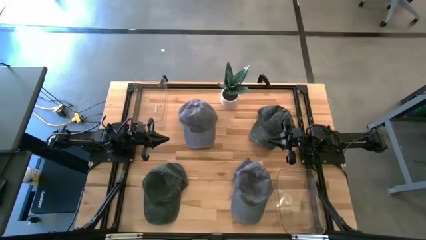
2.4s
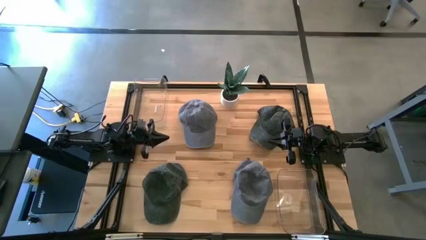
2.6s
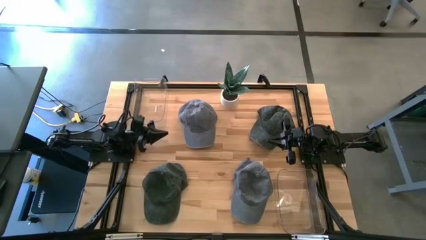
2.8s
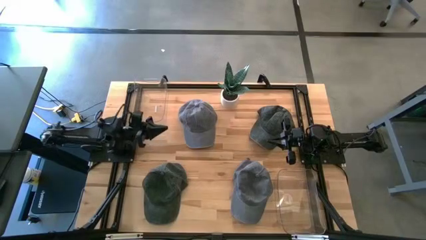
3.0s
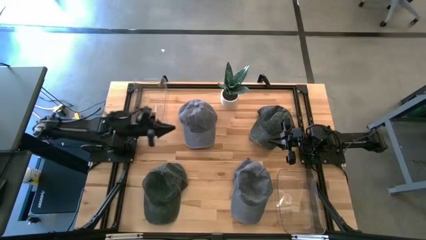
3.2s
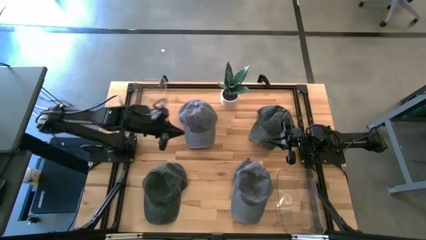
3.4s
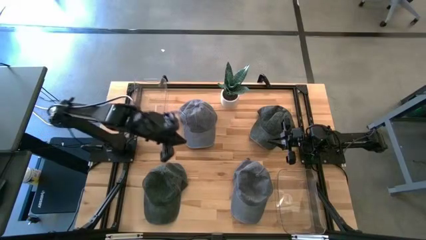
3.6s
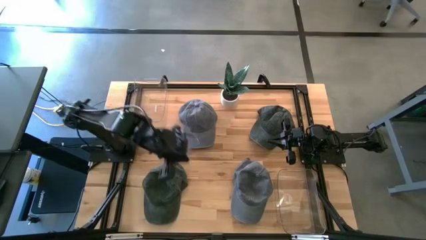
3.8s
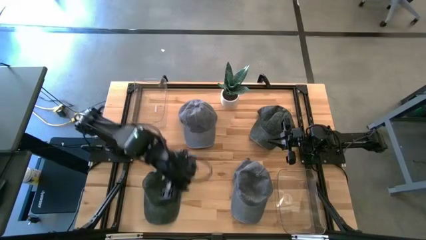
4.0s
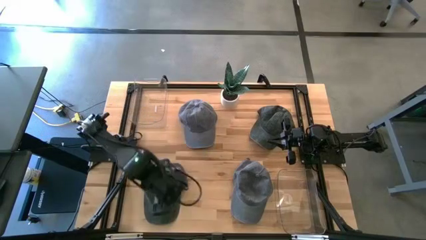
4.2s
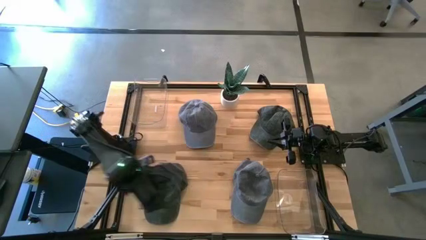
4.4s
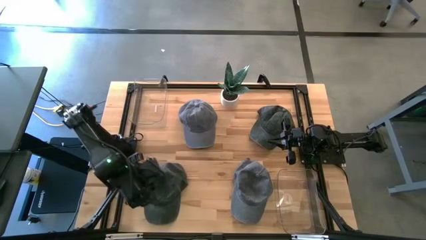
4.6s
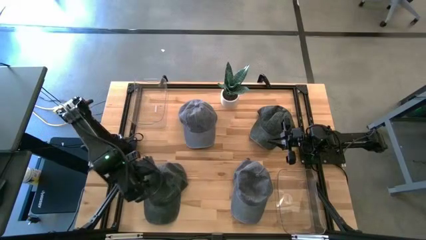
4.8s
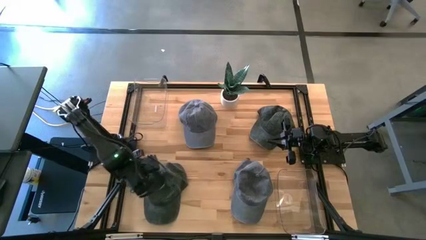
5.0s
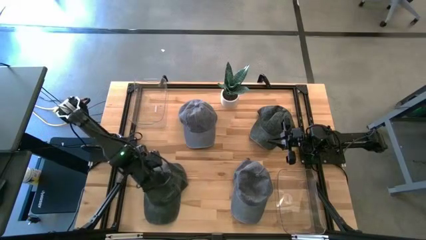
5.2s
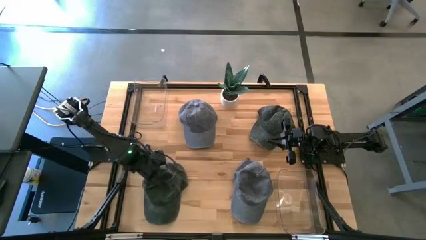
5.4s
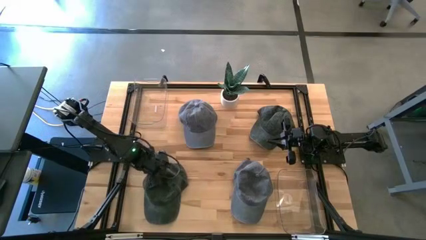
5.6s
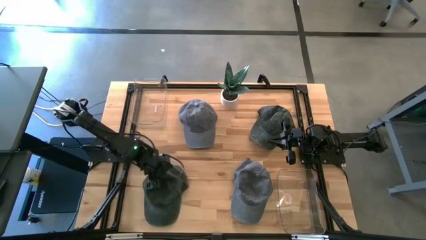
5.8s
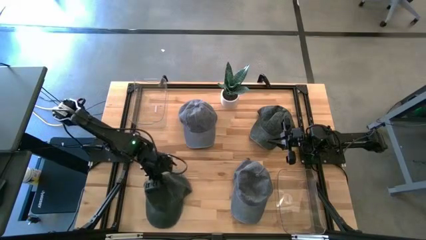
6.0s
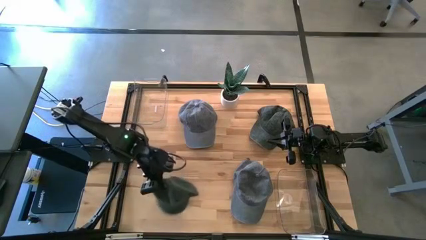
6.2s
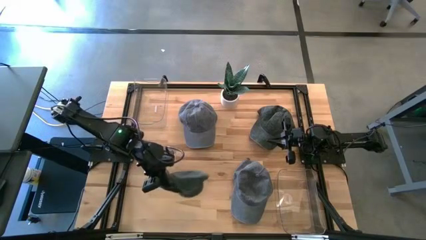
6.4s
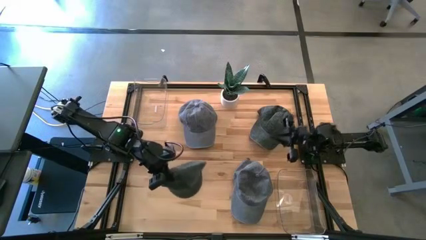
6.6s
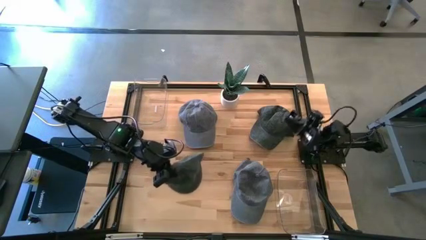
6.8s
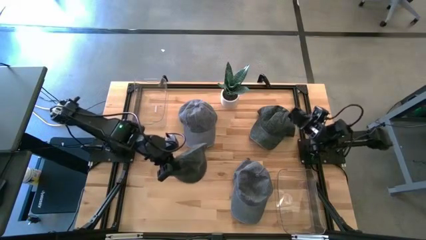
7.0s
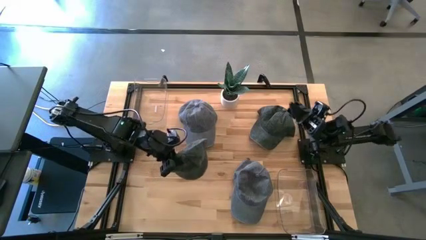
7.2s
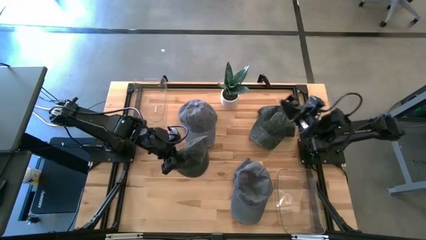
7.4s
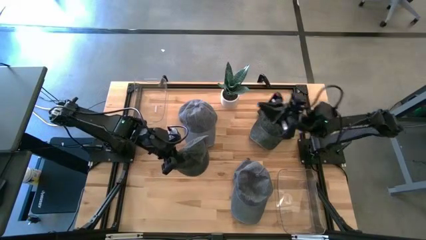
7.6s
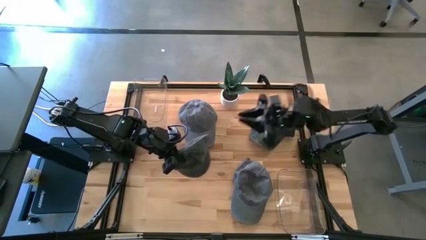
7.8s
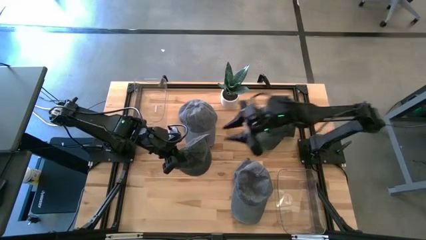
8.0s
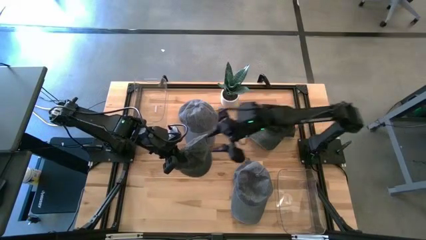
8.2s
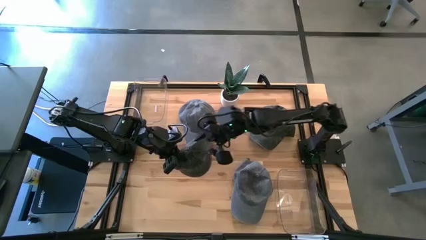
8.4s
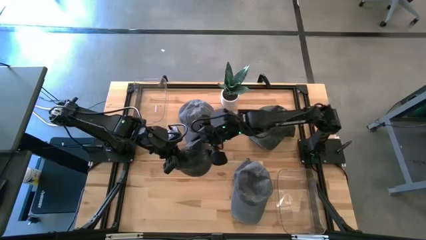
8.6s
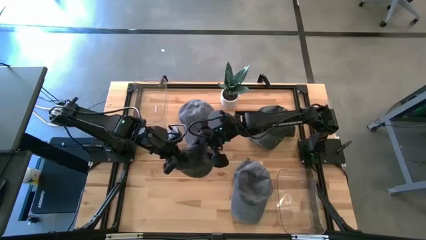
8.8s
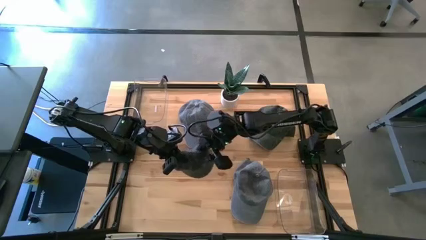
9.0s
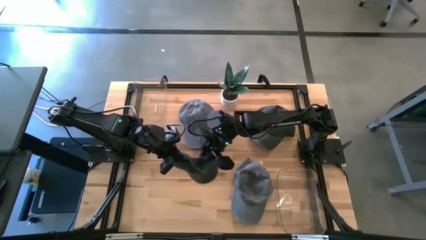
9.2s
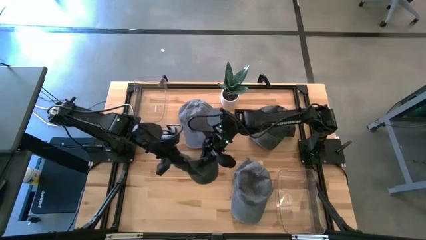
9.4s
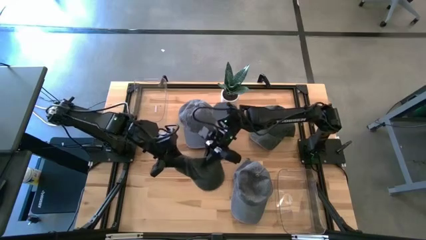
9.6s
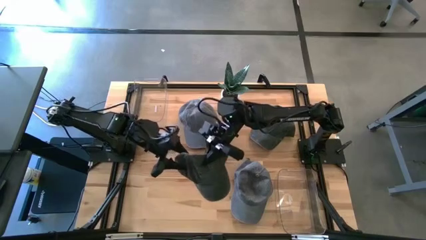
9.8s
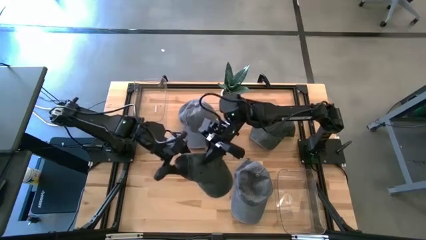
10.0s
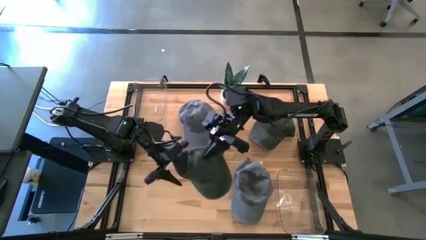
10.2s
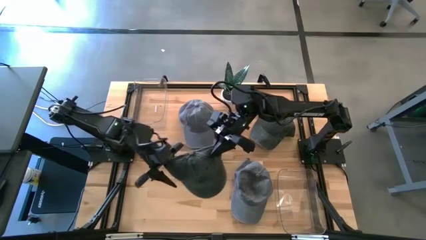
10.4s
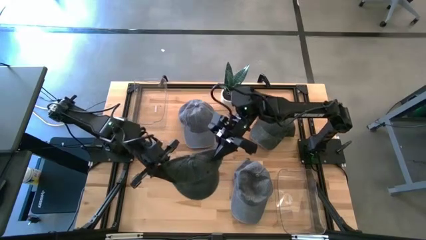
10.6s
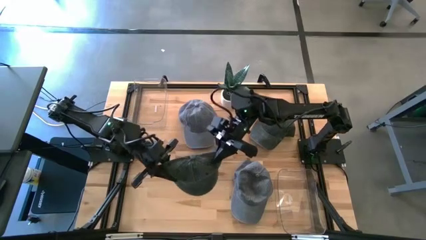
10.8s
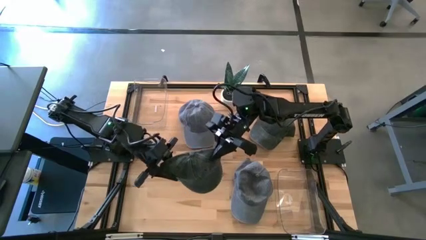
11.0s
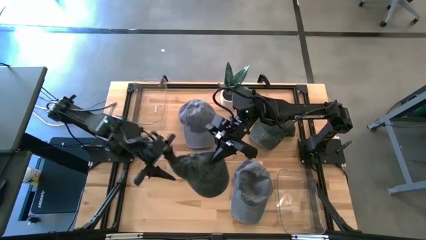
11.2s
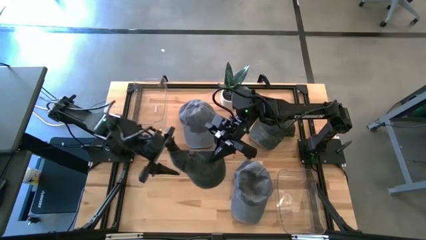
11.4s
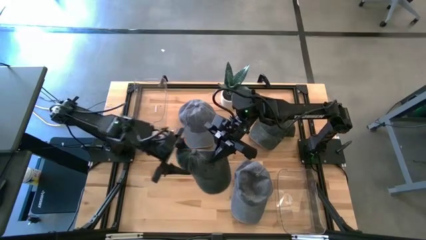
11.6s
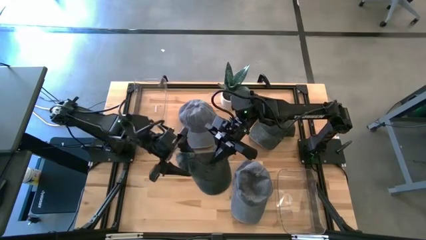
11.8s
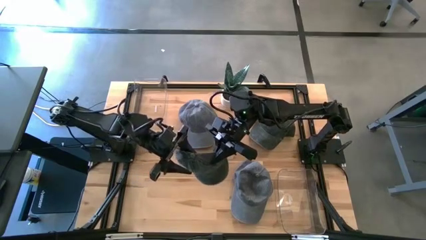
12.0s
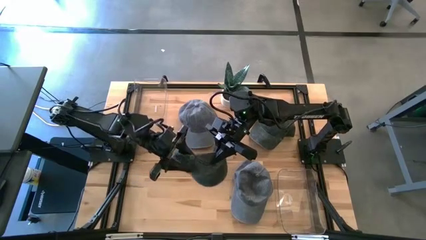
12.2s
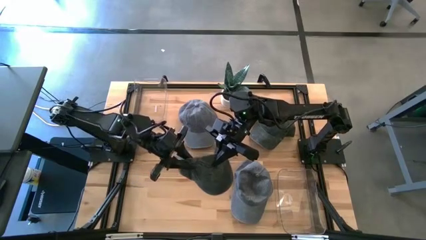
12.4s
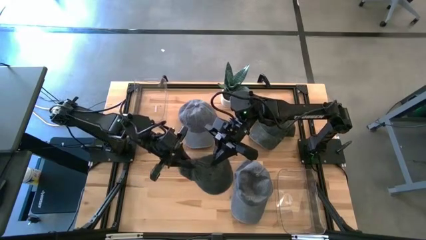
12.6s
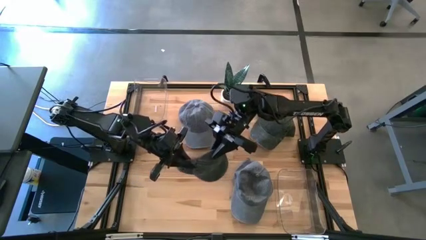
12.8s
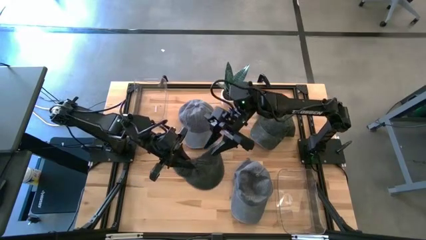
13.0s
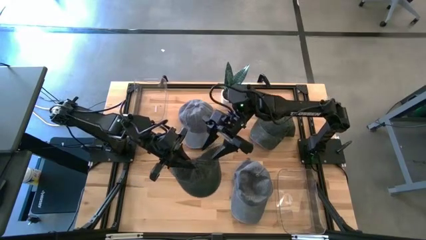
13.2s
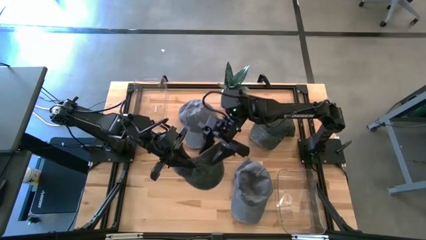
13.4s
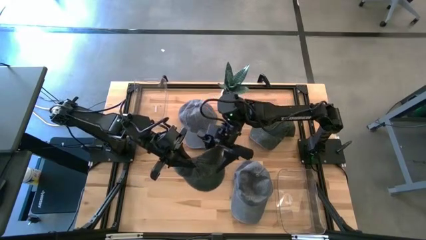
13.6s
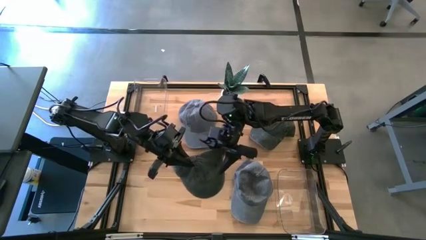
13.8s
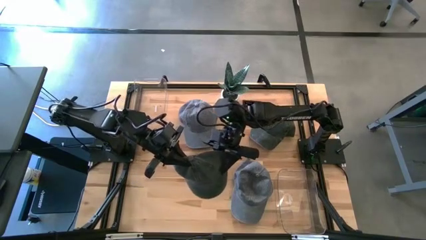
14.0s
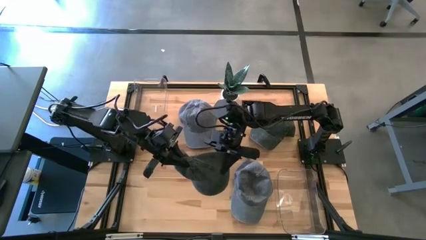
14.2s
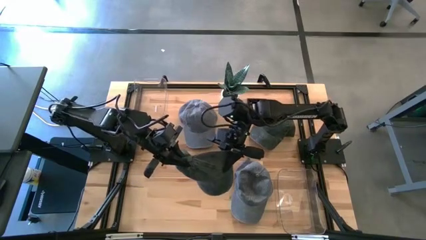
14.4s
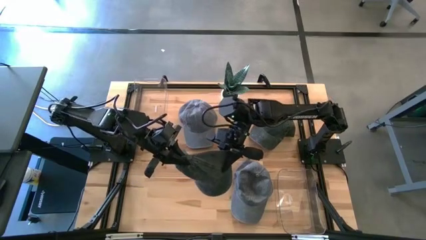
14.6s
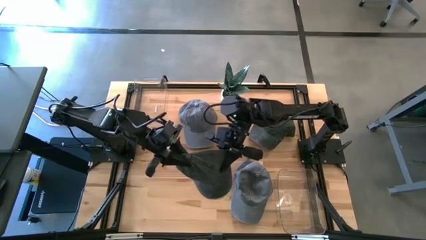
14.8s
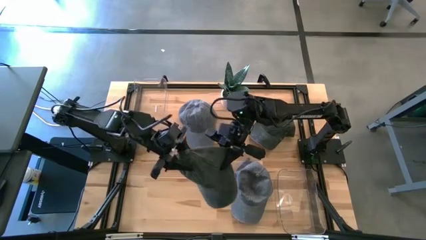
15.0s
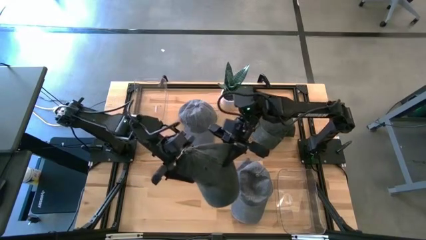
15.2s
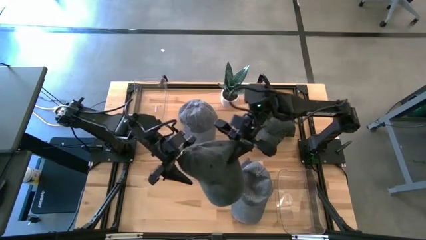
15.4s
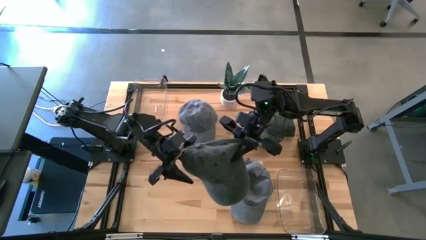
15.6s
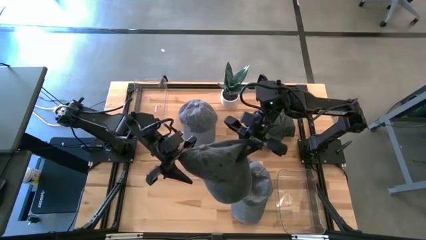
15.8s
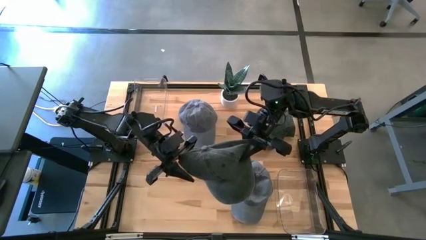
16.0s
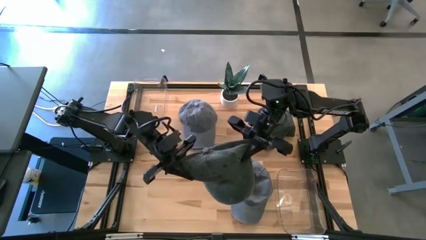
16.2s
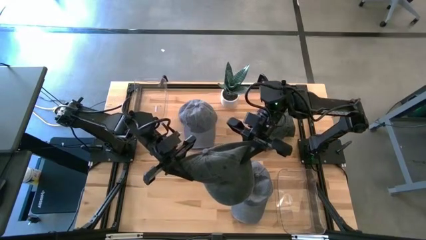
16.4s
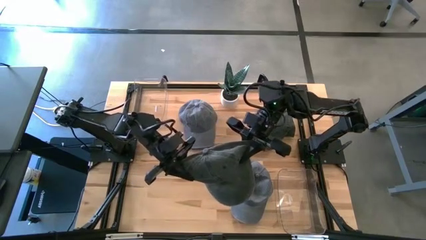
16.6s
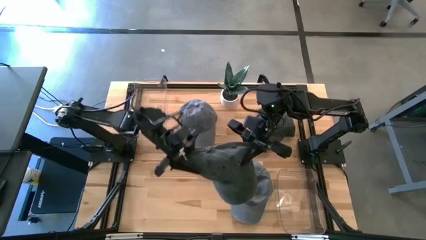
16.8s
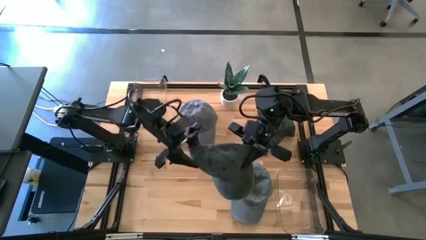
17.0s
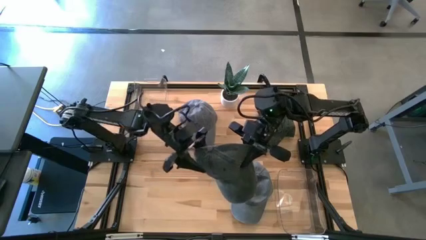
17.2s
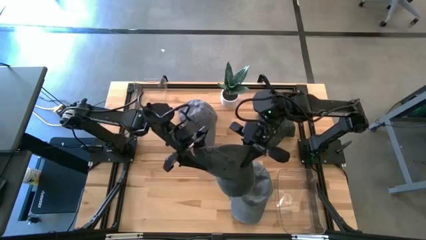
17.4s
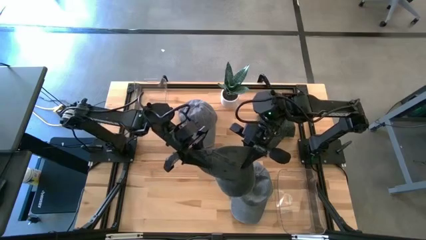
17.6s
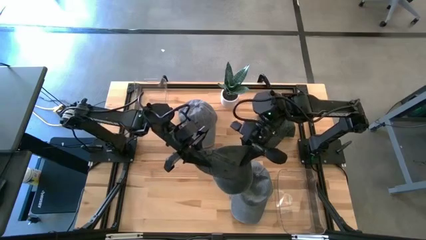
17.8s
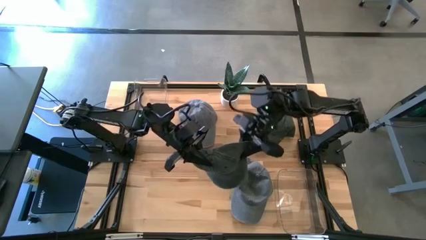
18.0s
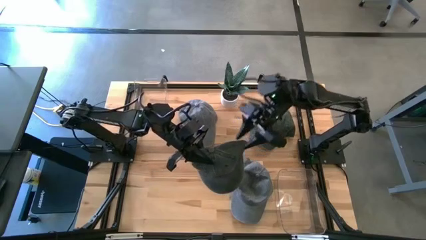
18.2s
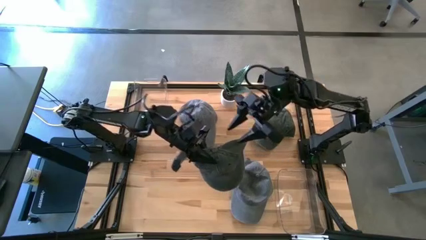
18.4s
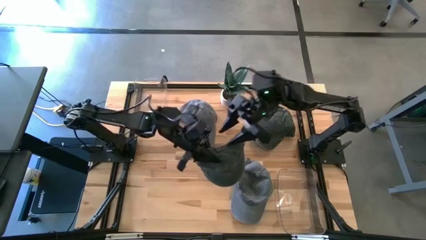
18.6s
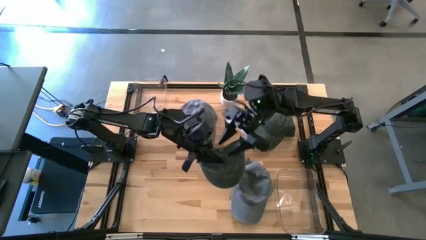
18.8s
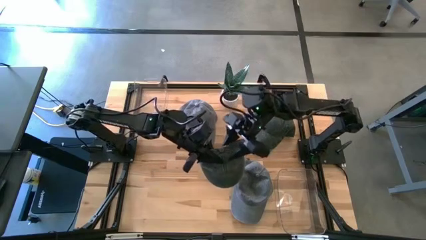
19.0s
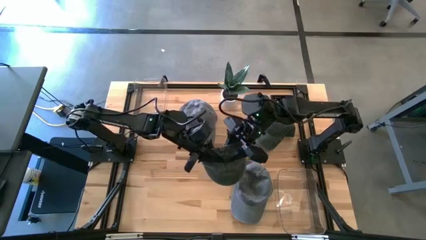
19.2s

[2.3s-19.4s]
Task: Pick & Place hat
Put the bottom black cap into the bottom transparent bin
